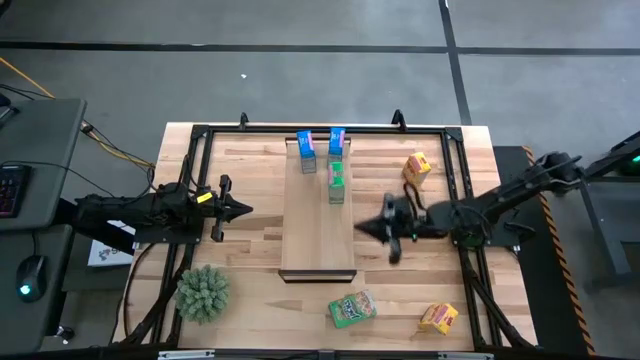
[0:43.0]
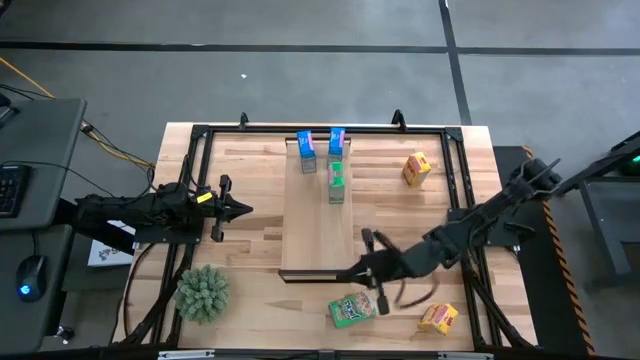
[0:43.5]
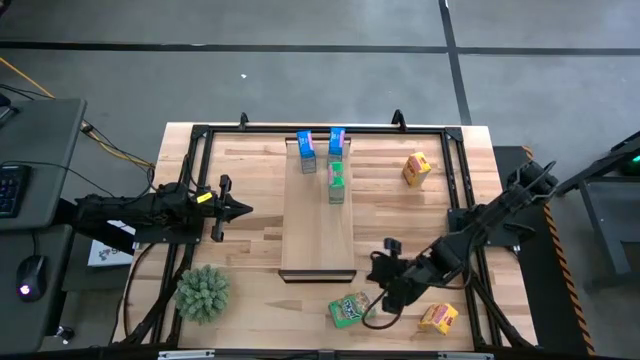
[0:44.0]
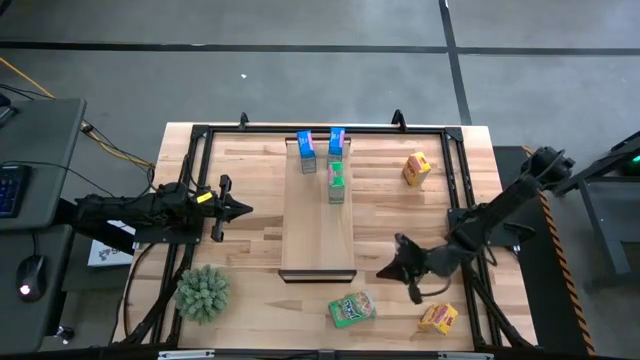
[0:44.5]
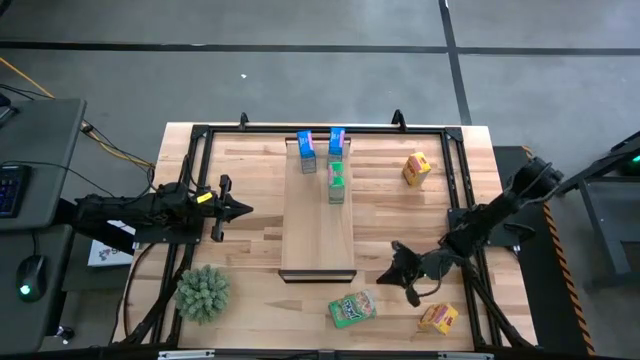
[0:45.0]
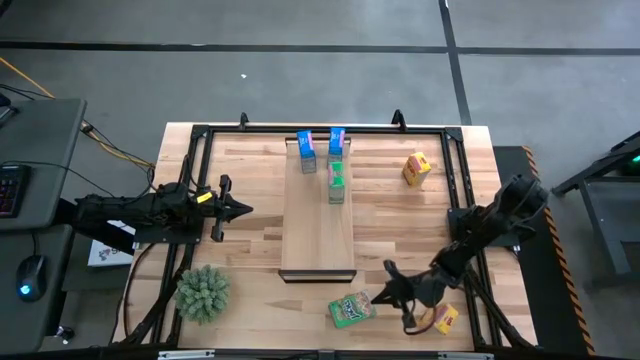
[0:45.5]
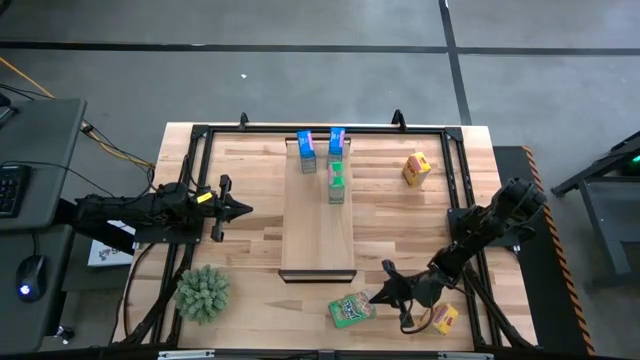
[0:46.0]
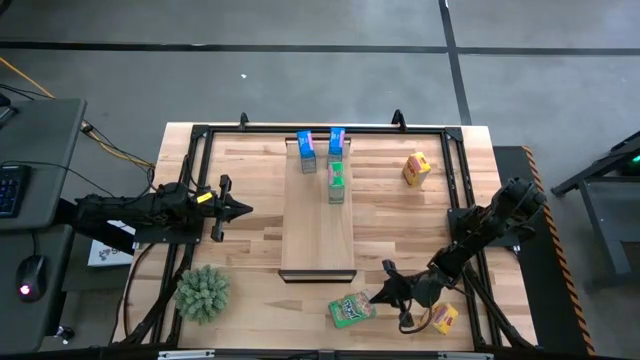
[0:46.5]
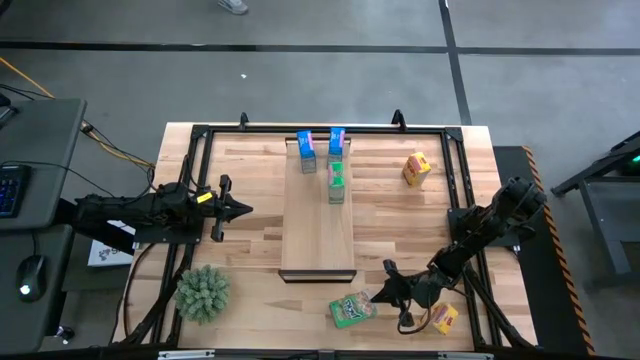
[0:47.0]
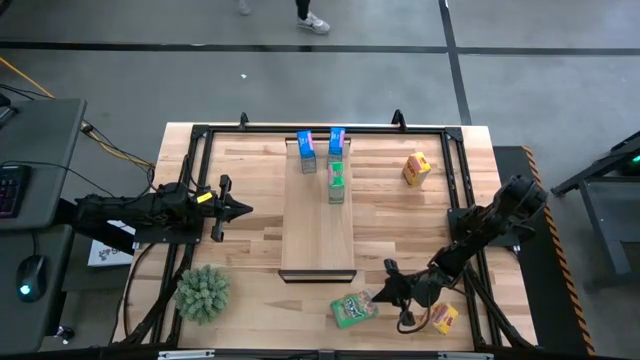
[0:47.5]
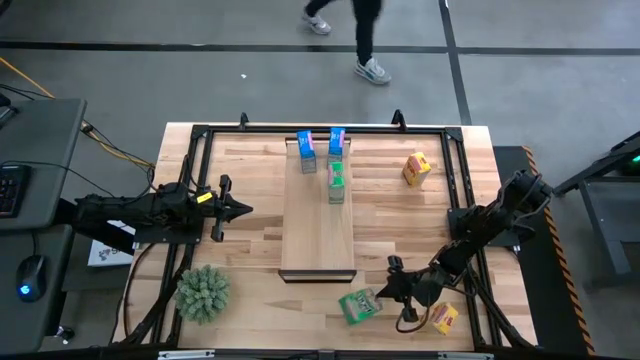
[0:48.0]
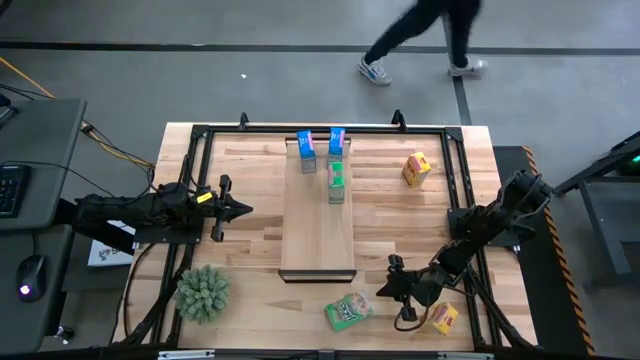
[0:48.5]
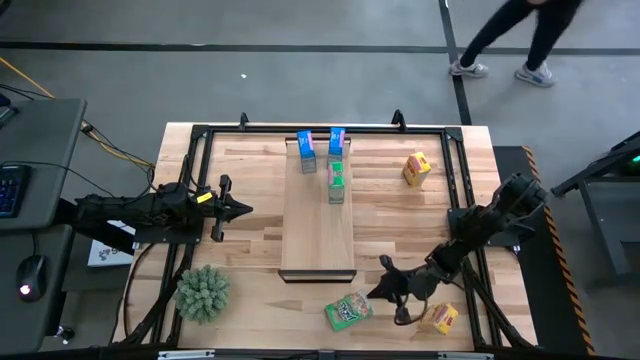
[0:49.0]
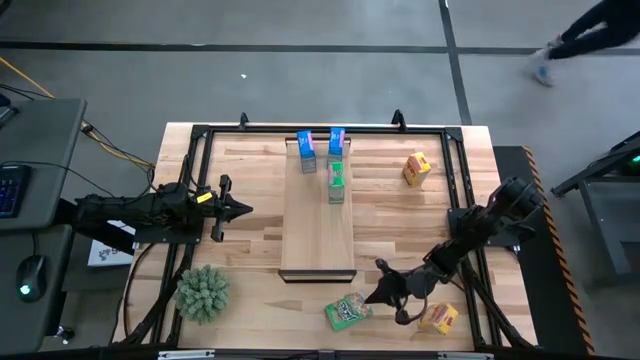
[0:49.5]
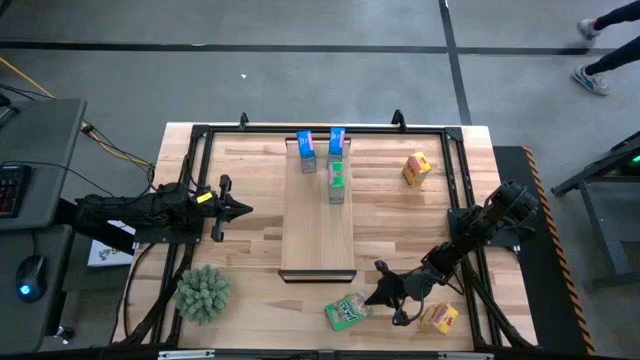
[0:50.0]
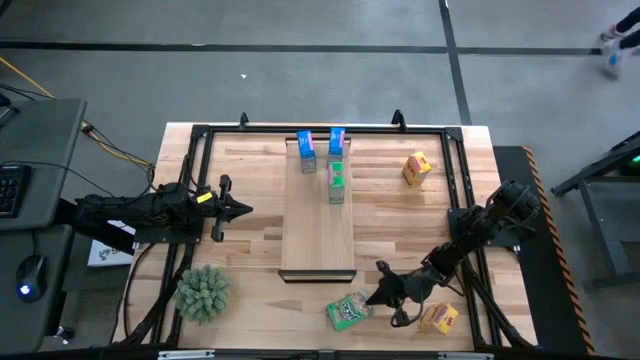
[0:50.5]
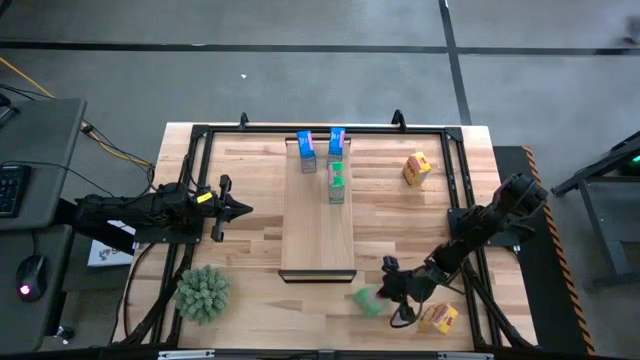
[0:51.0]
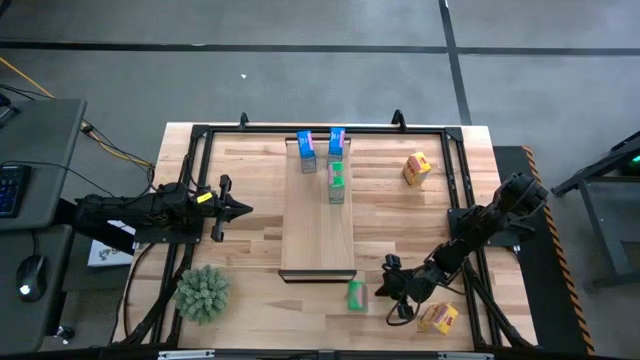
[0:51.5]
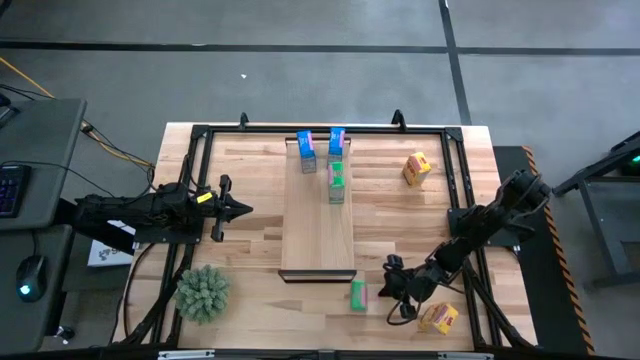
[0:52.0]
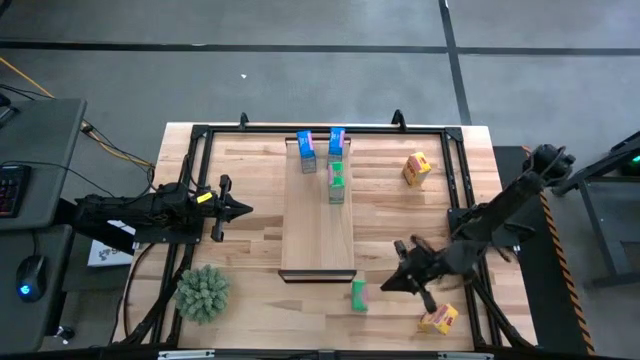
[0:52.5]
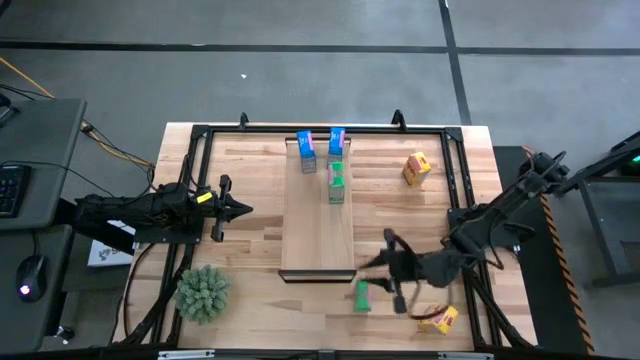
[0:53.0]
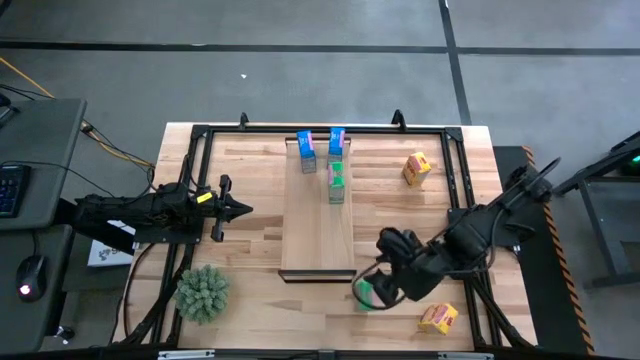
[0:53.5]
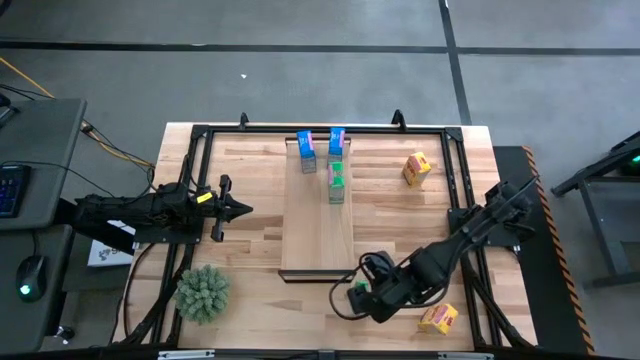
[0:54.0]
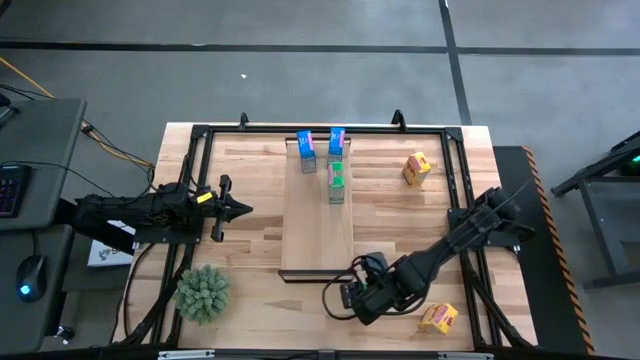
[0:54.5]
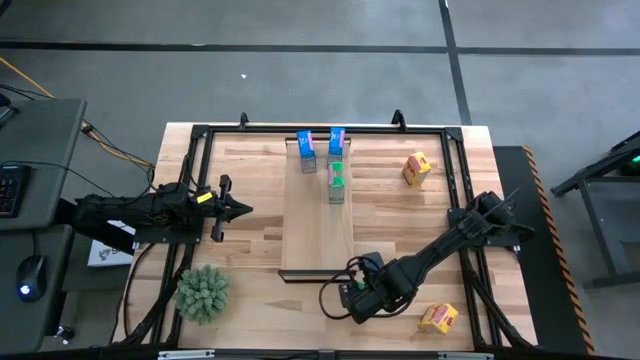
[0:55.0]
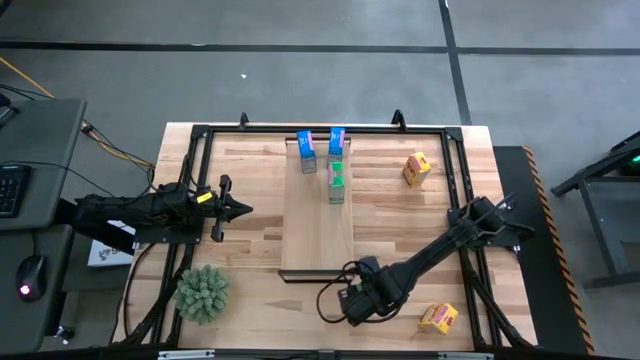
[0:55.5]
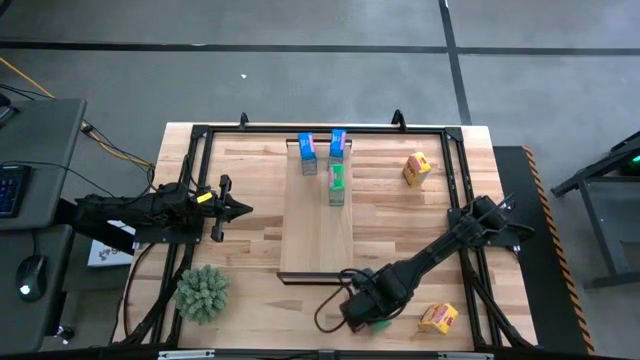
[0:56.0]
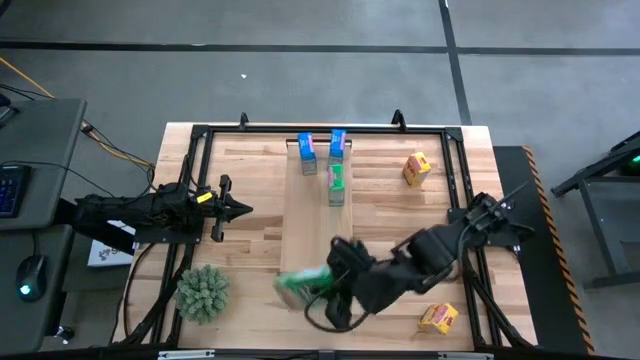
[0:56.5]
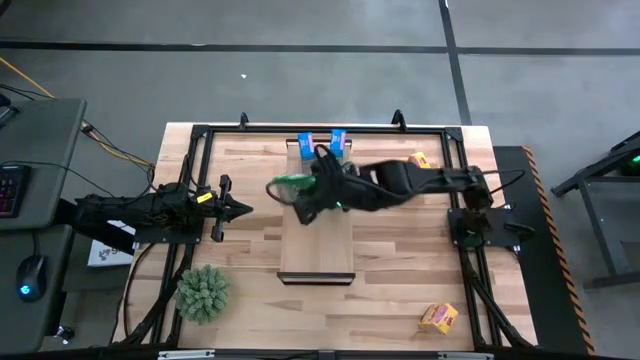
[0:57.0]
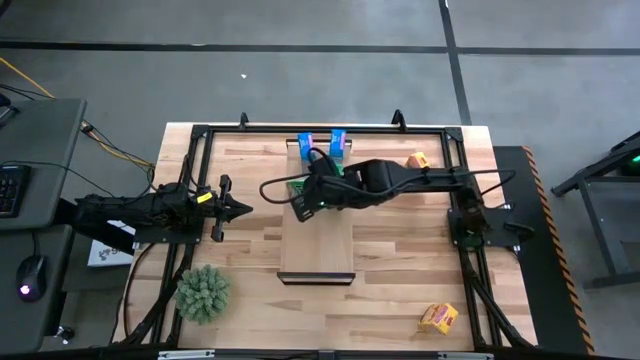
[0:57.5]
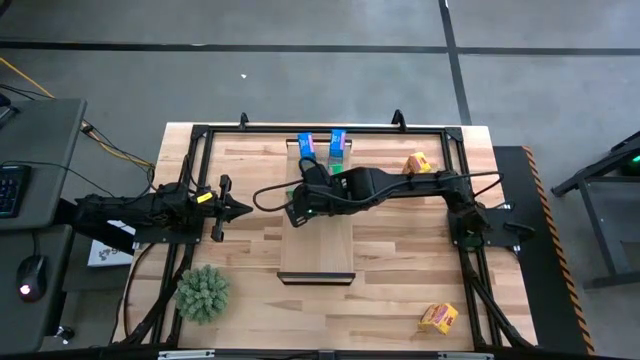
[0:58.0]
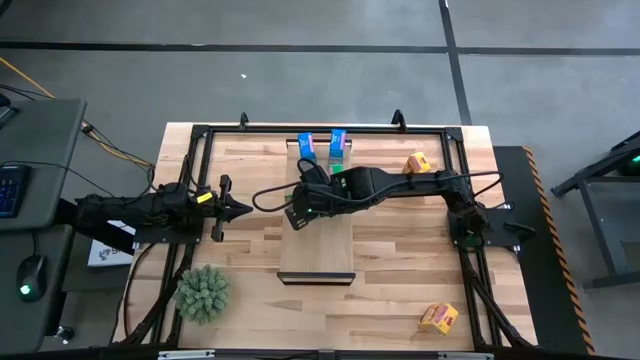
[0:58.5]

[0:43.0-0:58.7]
Task: Stack cereal on shelf
Put the green cereal box on the shelf aligned with the other green cereal box

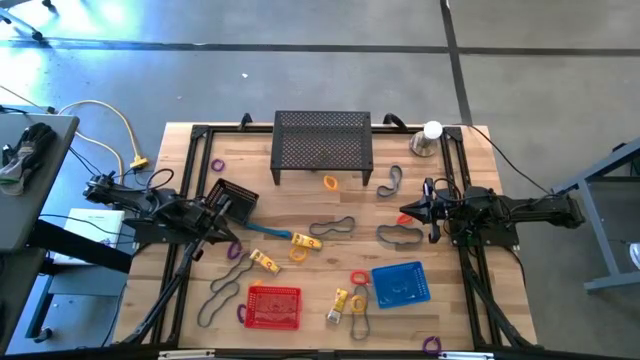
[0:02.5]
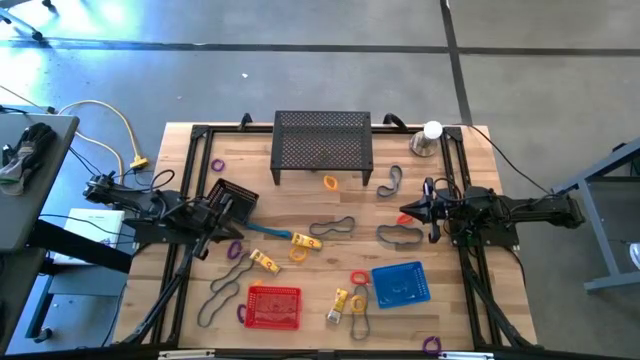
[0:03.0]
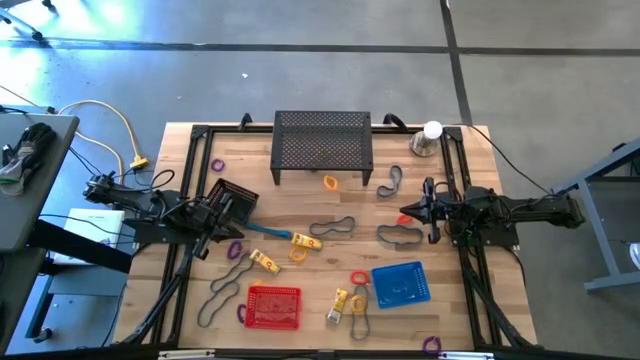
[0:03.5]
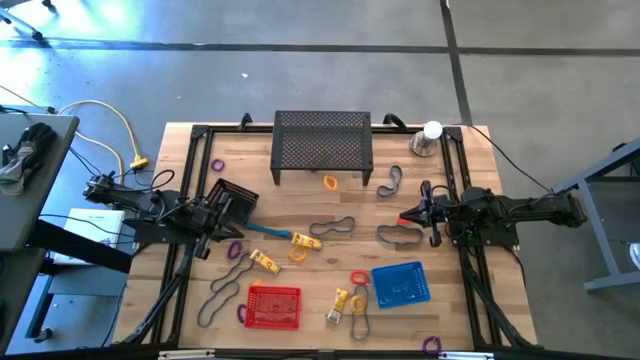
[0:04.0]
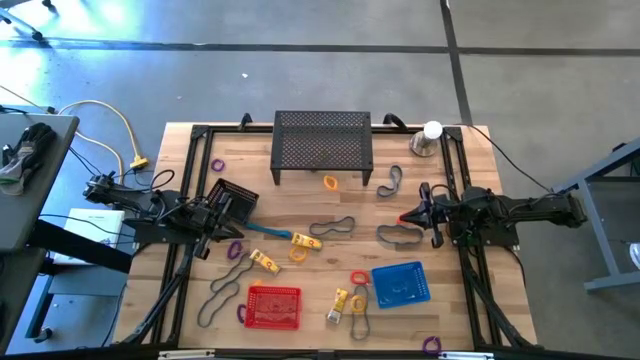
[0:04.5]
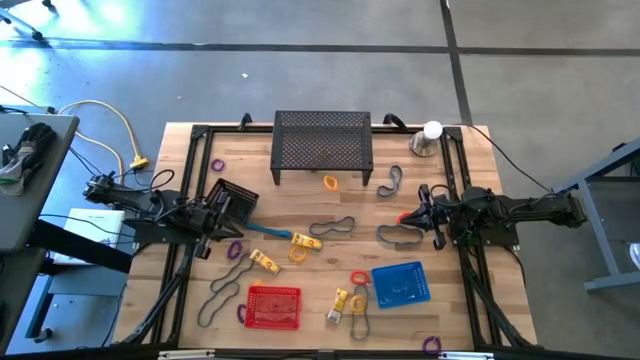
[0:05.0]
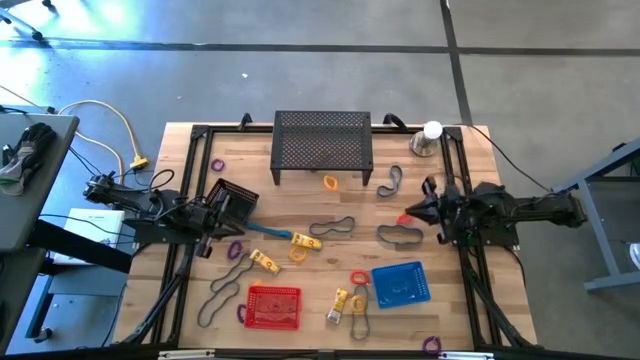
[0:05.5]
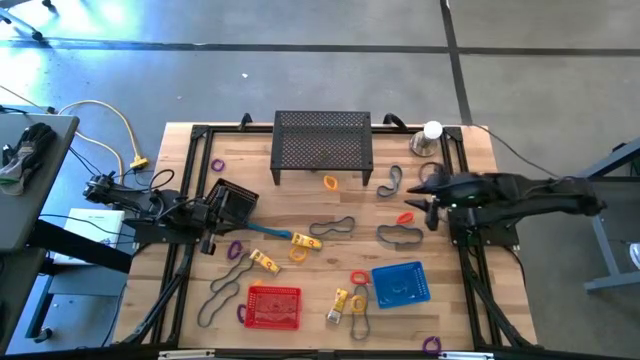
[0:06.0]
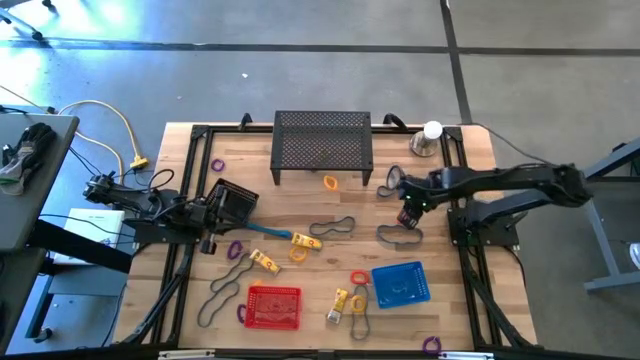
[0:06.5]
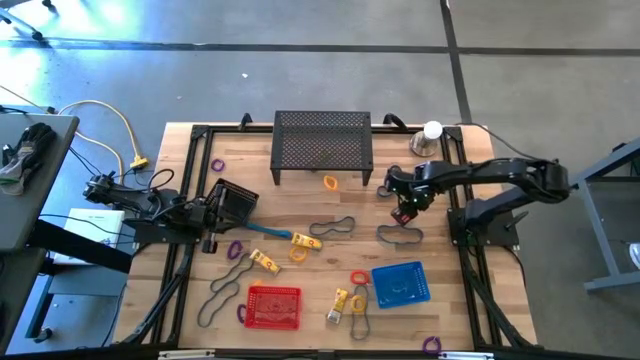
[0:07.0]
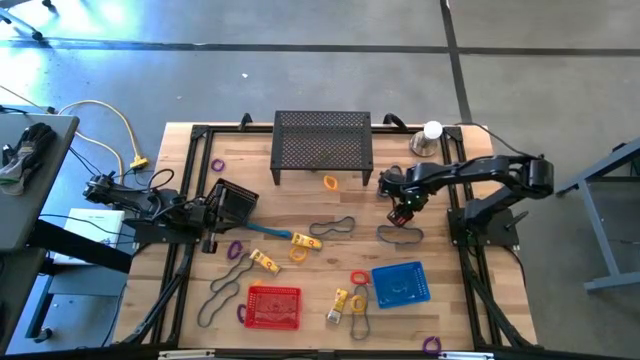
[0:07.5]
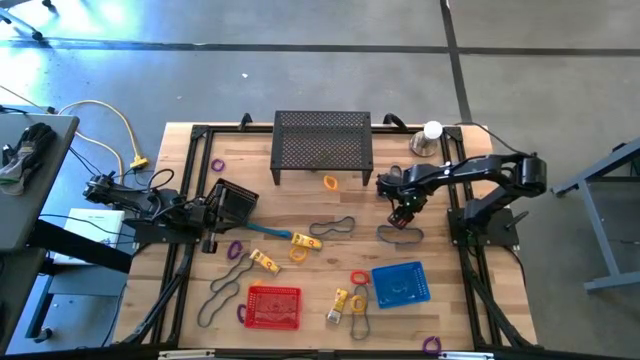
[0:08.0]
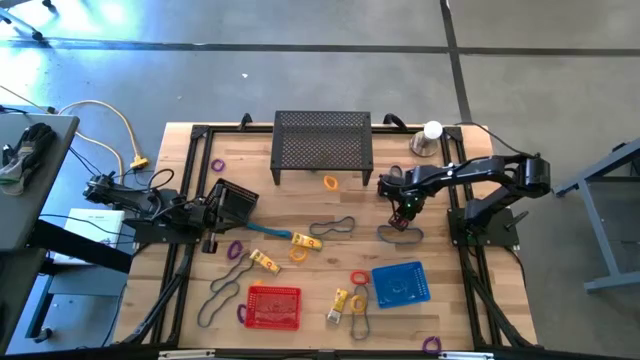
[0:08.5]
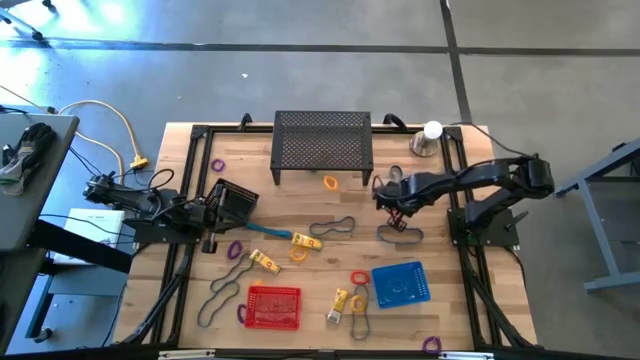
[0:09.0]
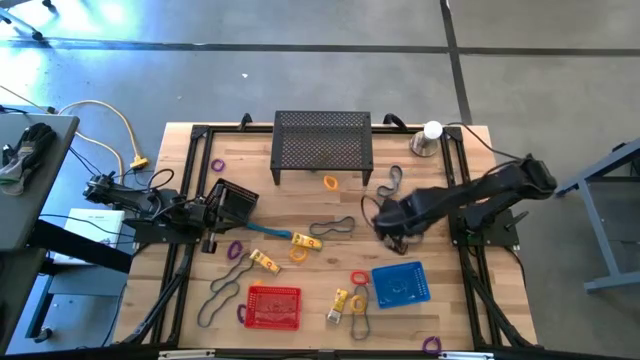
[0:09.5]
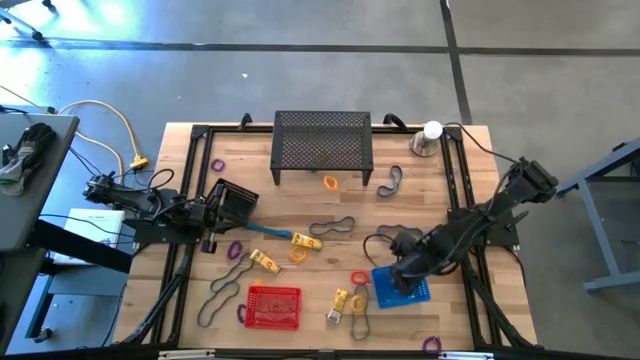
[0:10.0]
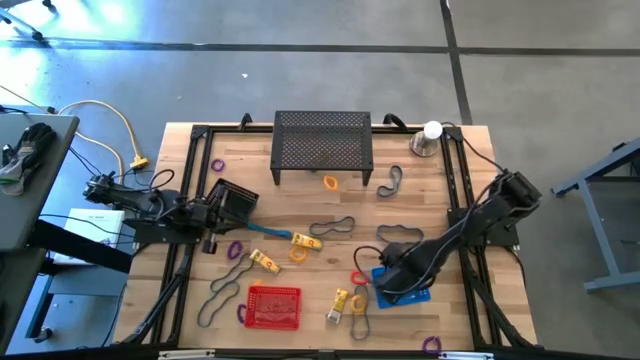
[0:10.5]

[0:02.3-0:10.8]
Task: Pick & Place Office Desk Supplies
Put the orange spring keychain into the blue bin
